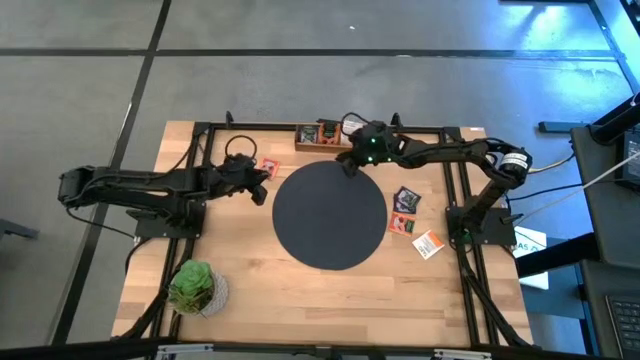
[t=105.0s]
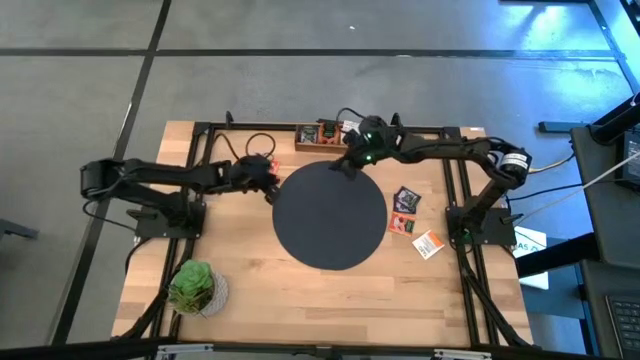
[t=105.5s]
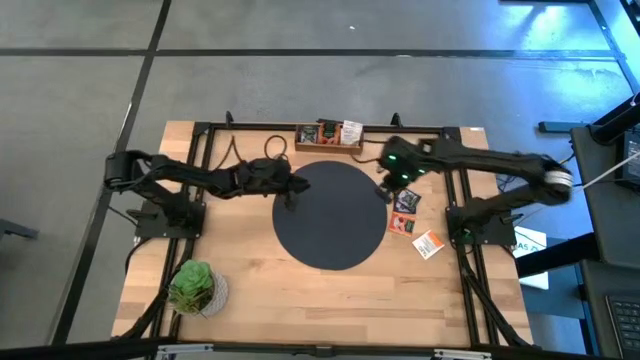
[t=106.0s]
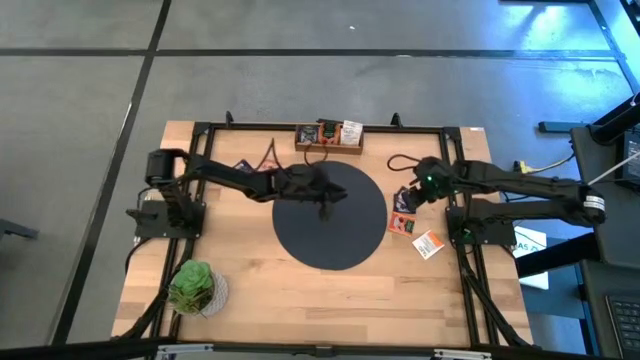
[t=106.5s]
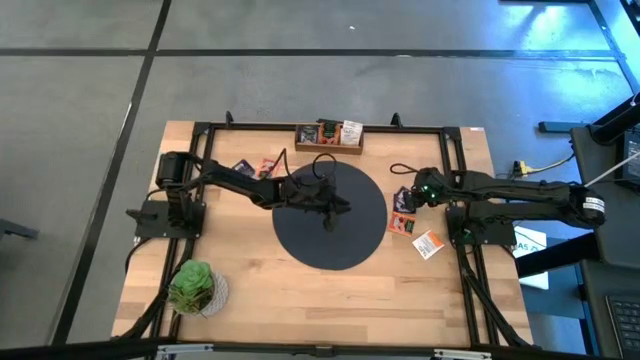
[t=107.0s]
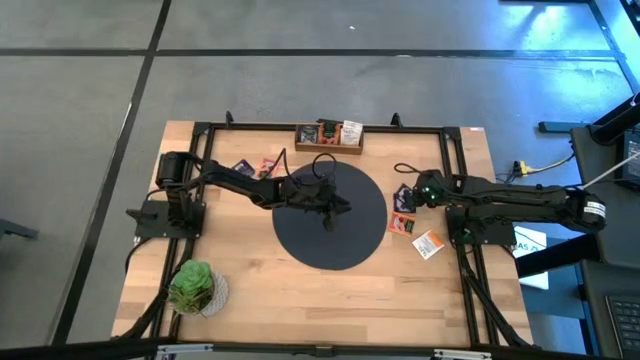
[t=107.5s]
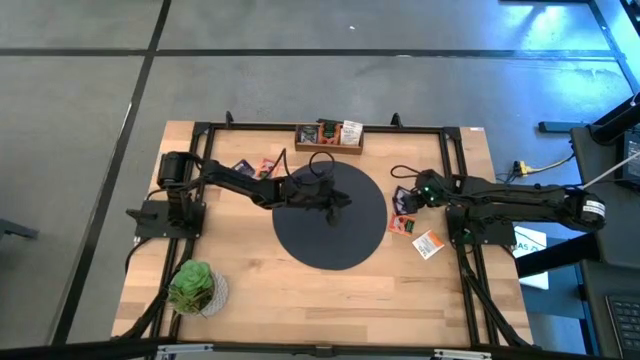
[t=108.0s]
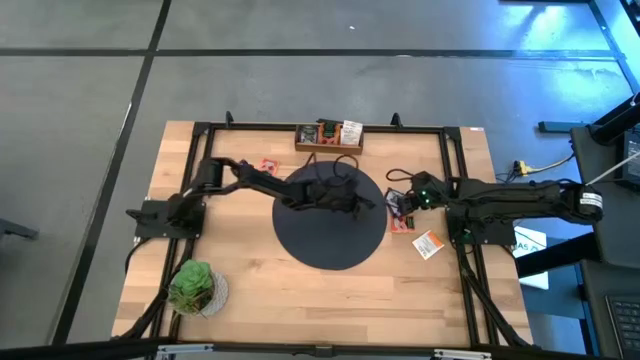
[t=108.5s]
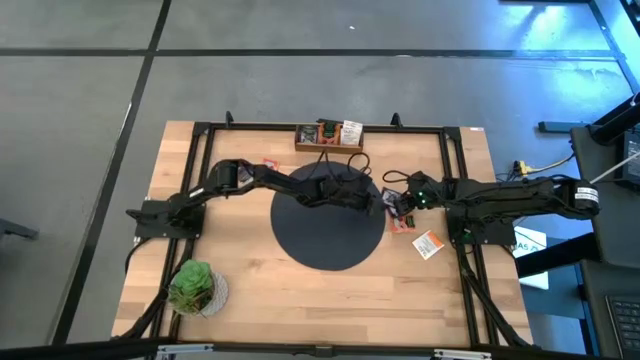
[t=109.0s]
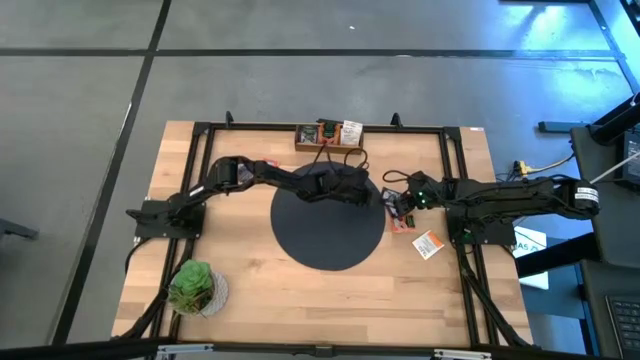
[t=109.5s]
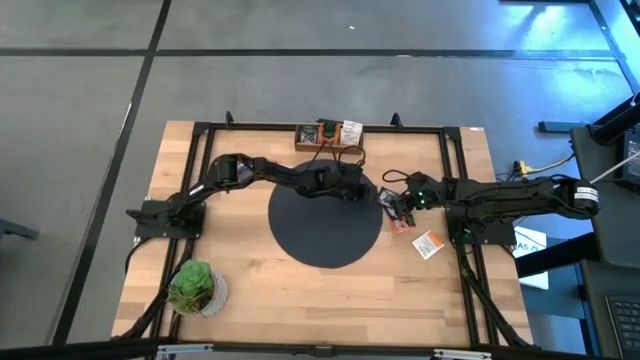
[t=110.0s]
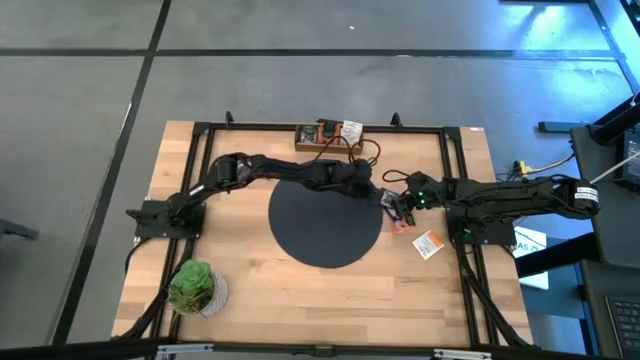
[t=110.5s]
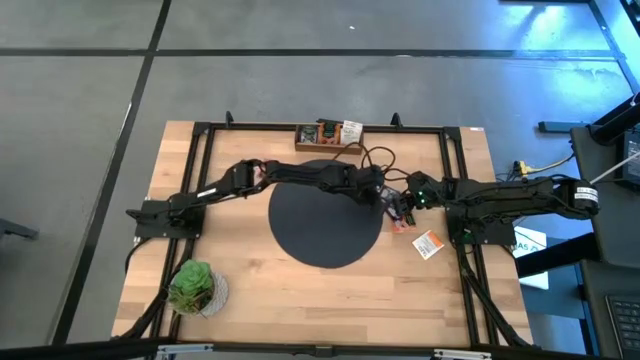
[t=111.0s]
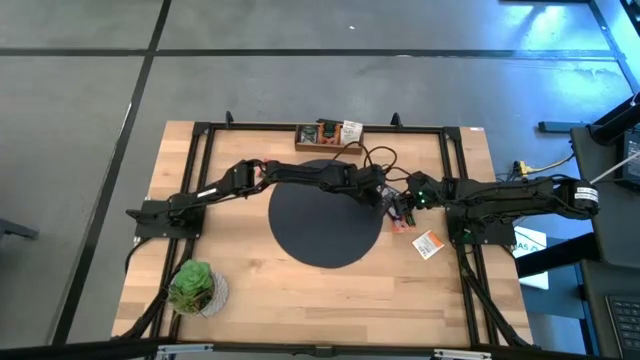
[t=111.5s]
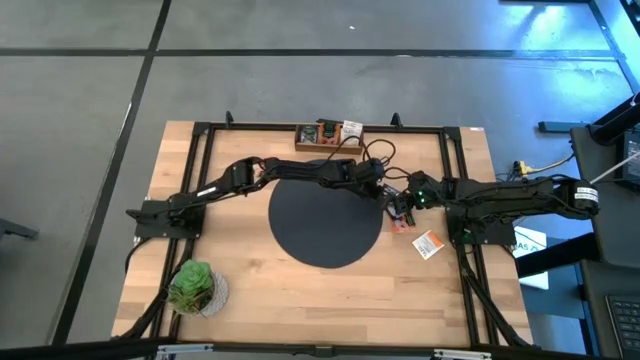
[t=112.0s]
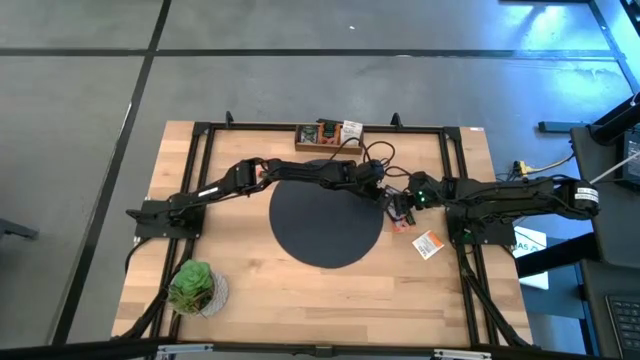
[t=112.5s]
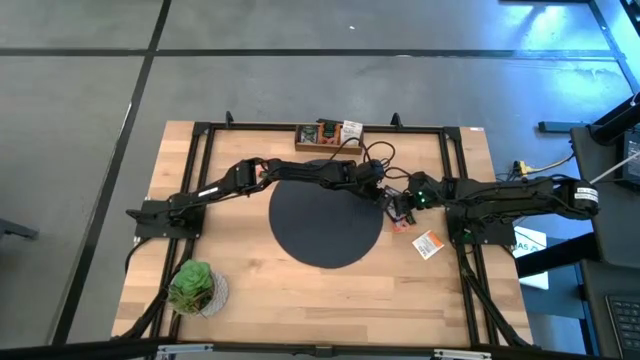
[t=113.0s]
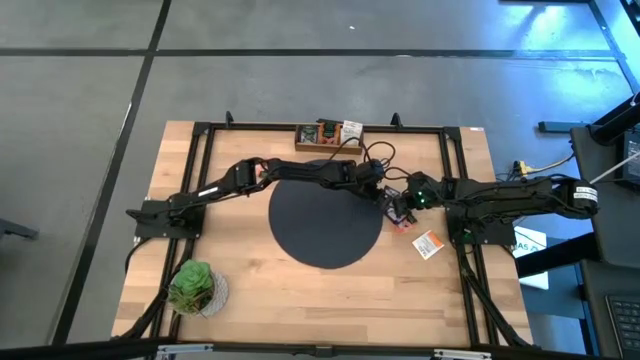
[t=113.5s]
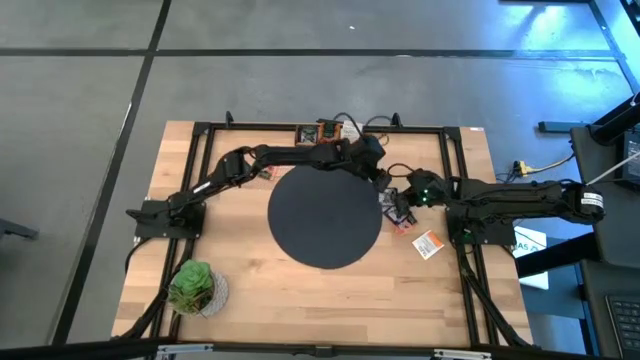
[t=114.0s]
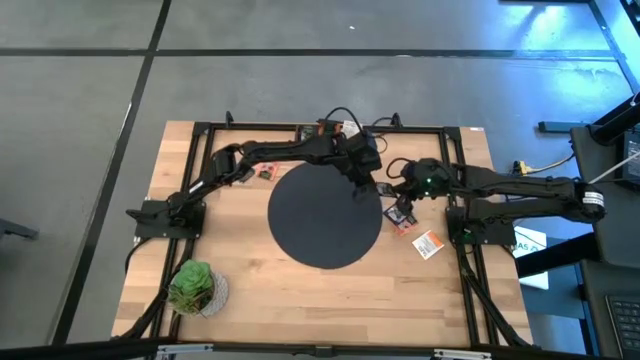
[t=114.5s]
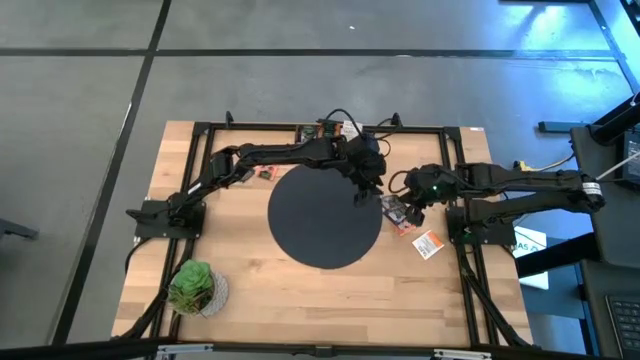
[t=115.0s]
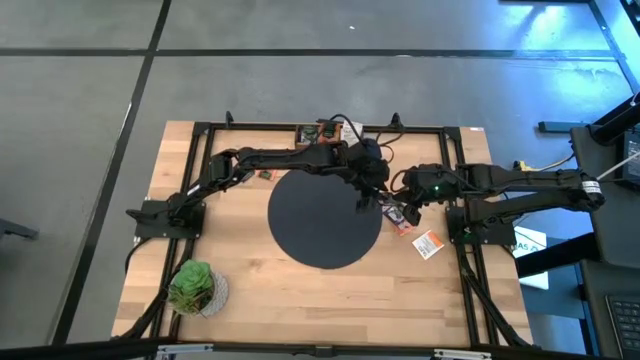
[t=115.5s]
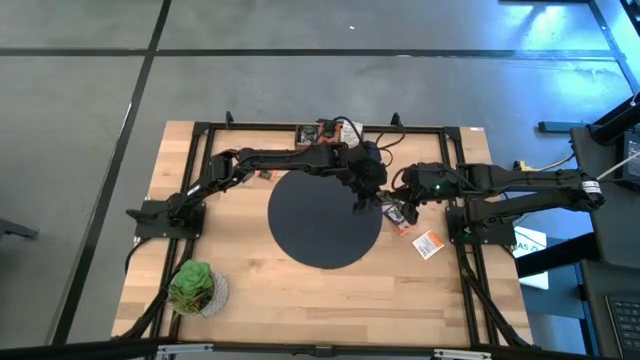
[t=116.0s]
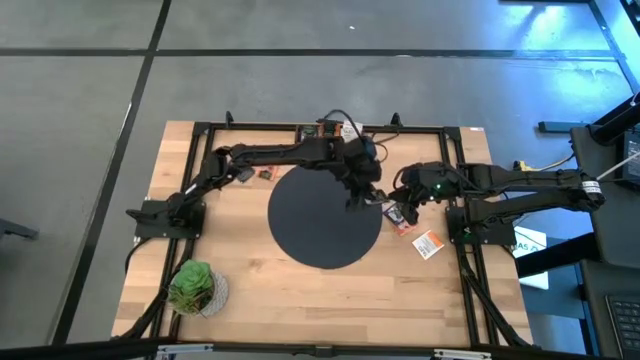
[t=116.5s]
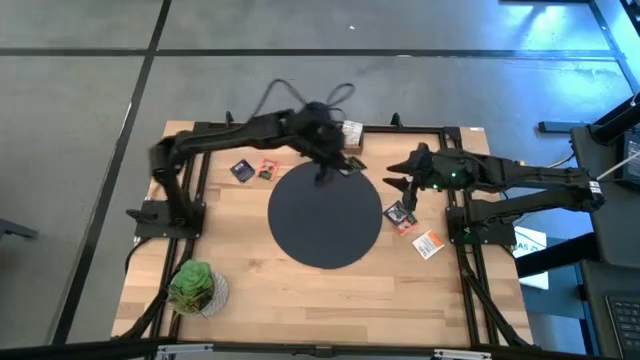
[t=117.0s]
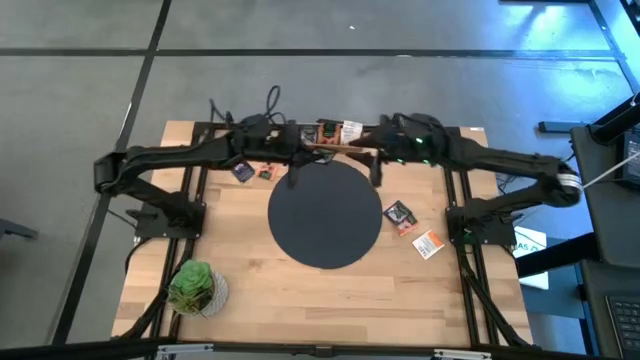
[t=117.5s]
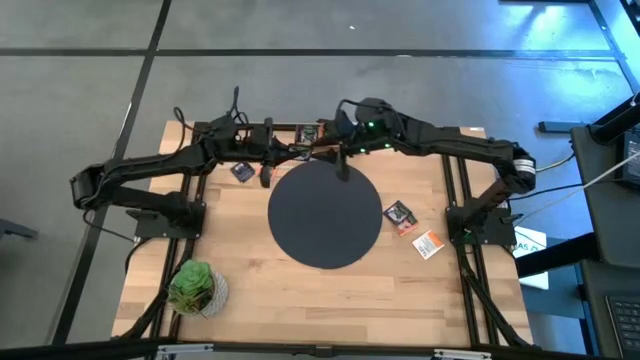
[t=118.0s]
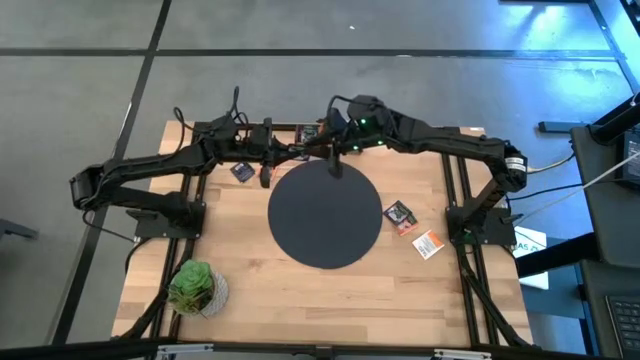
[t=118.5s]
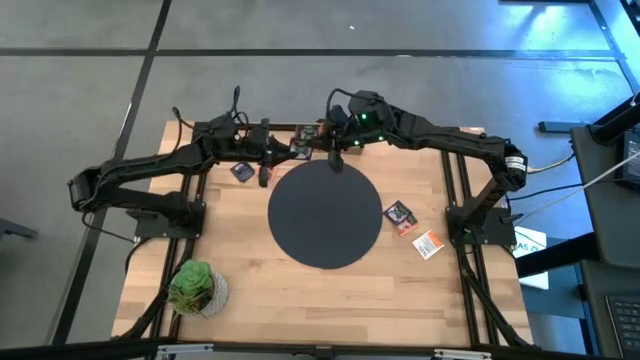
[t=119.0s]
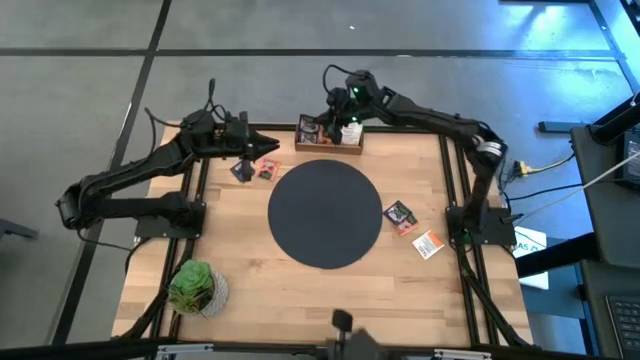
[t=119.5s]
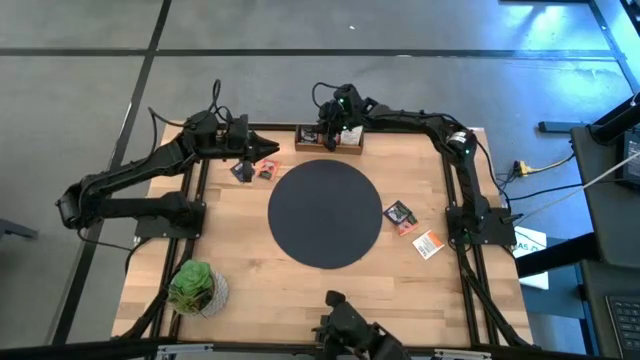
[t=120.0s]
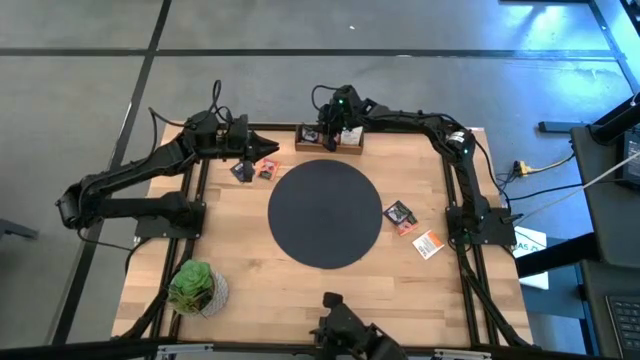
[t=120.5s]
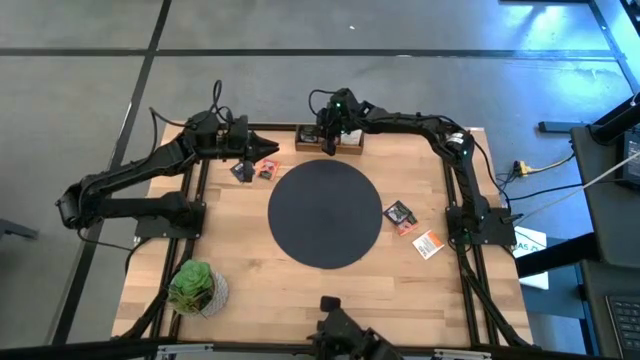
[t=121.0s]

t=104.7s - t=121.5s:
Task: Pick & Place Tea
Put the purple tea bag into the left section of the wooden organizer

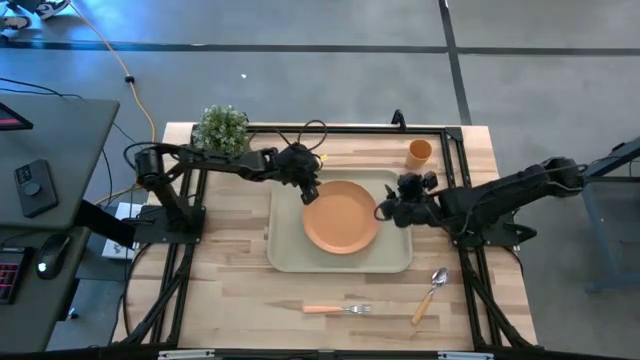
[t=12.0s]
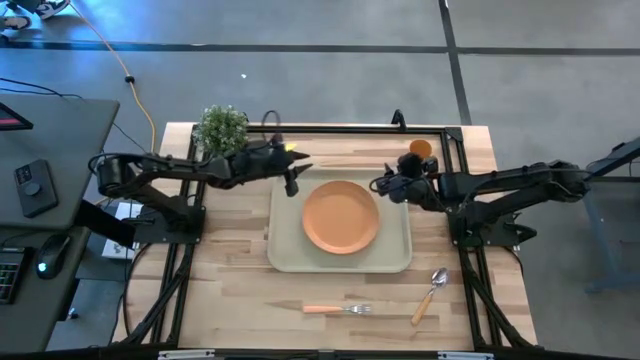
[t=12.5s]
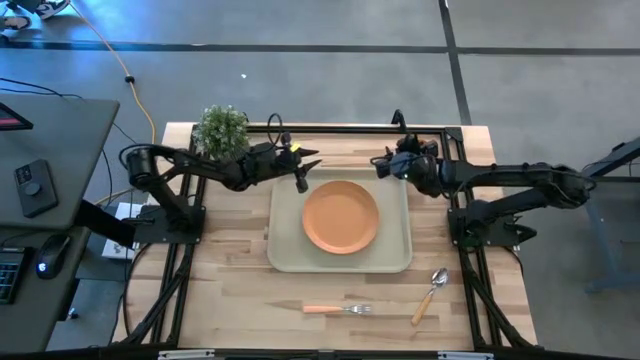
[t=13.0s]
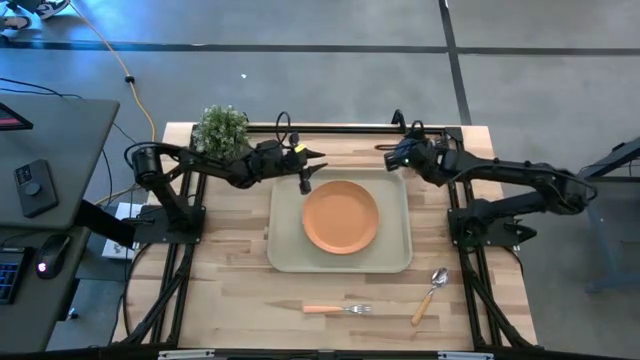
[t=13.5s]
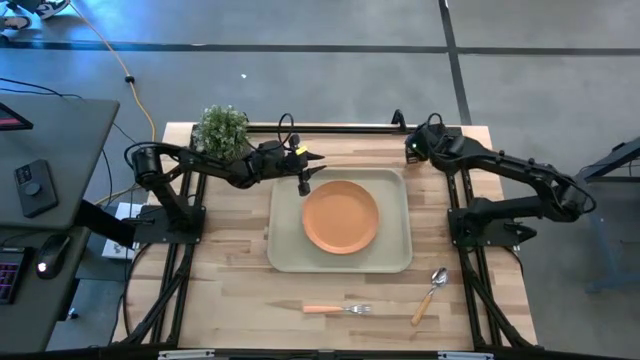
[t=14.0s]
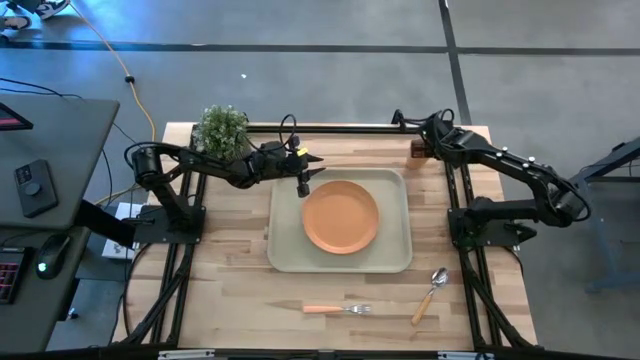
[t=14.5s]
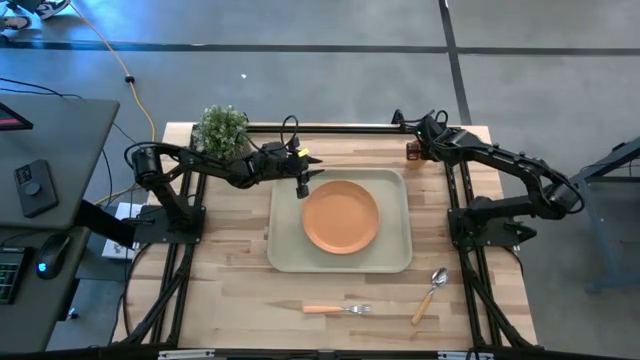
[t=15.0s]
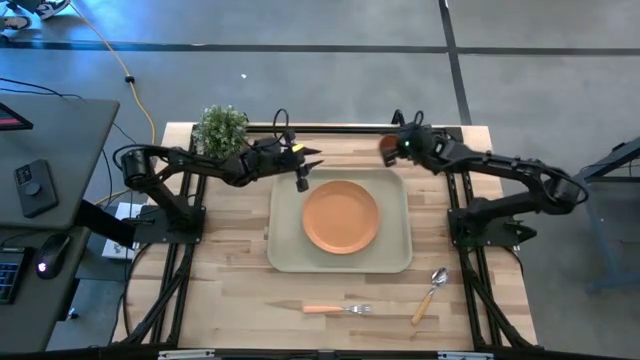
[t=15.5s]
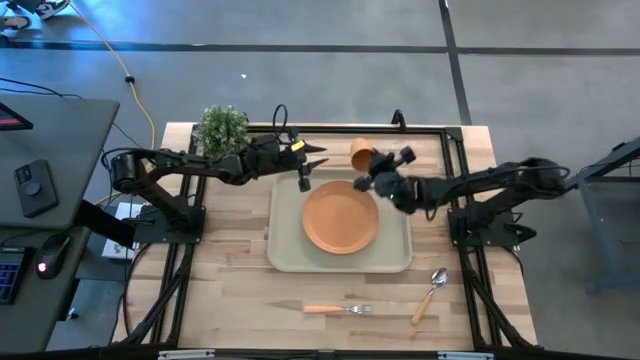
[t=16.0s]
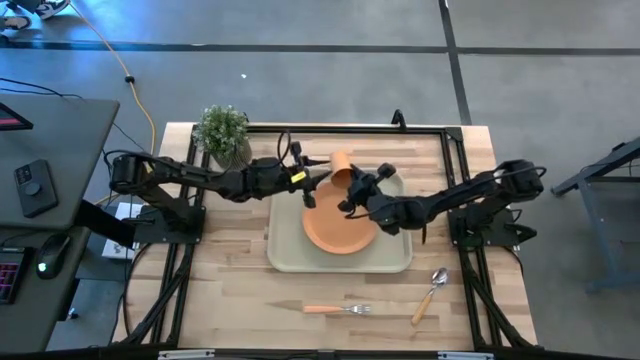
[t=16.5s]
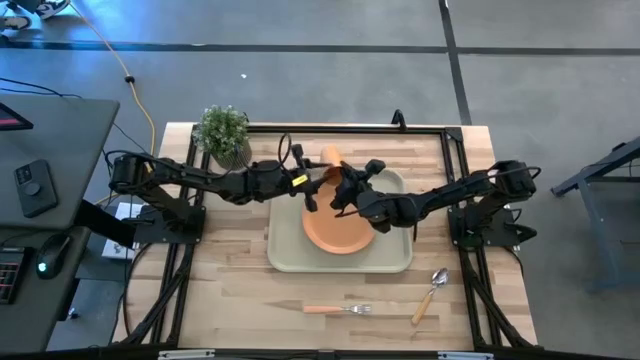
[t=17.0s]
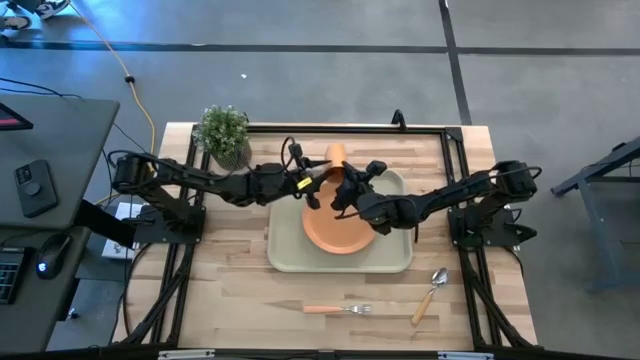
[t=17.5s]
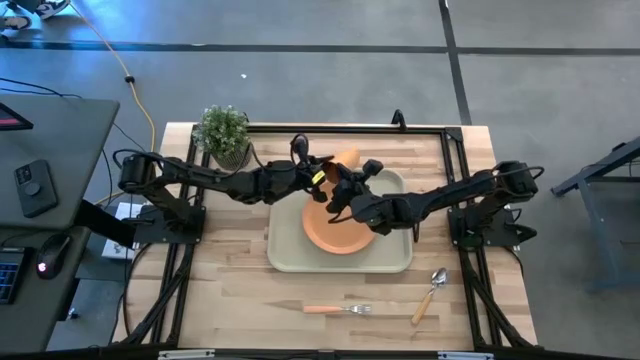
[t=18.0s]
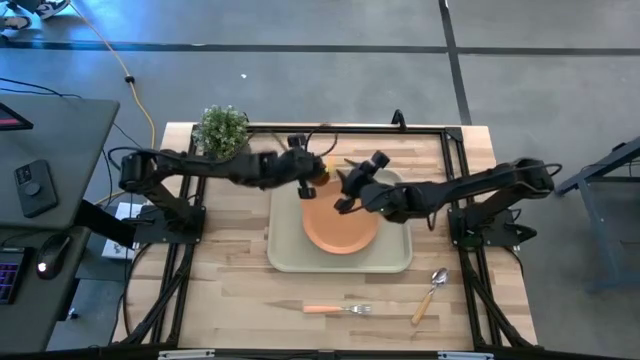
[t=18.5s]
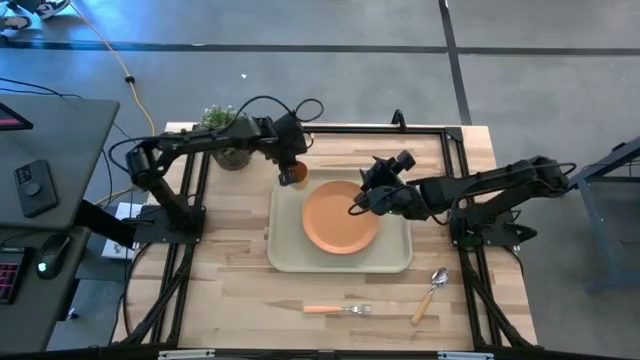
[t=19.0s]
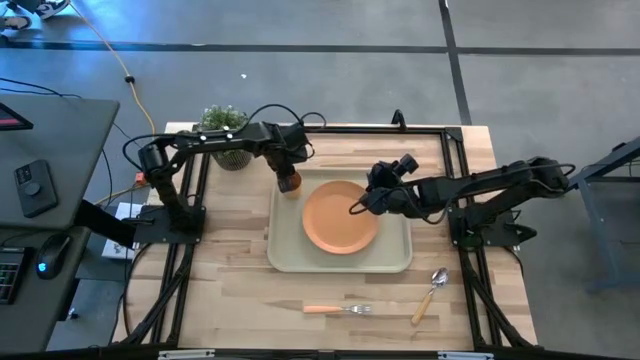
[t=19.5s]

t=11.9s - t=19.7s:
Task: Pick and place plate/cup/fork/spoon on tray
Put the orange cup on the light brown tray to the top left of the orange plate
